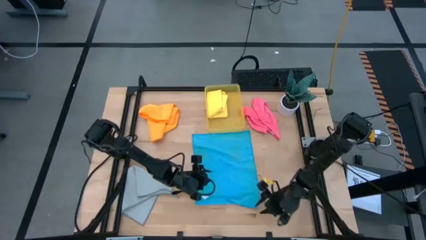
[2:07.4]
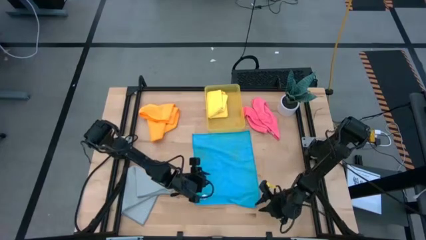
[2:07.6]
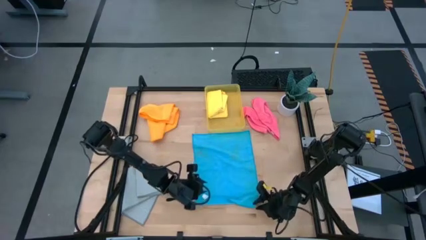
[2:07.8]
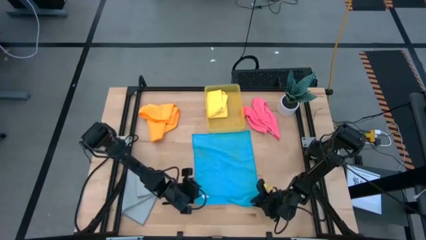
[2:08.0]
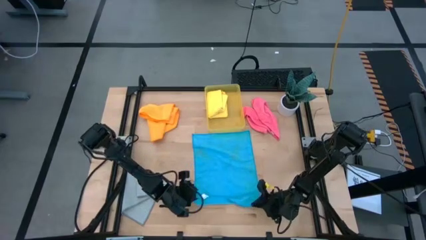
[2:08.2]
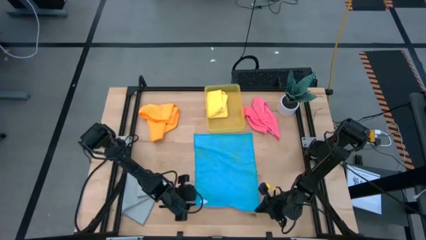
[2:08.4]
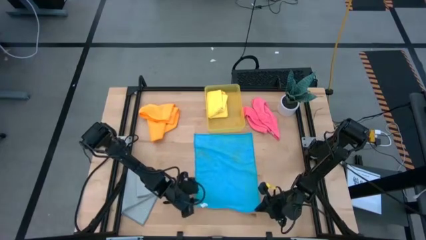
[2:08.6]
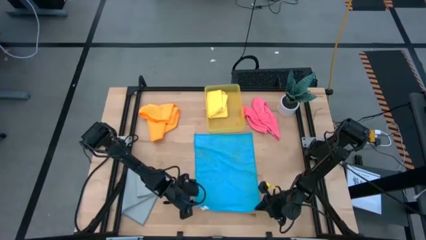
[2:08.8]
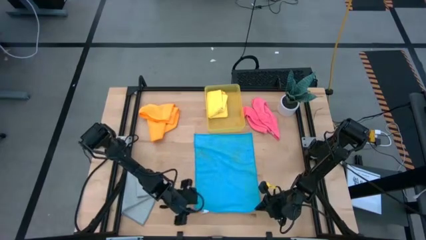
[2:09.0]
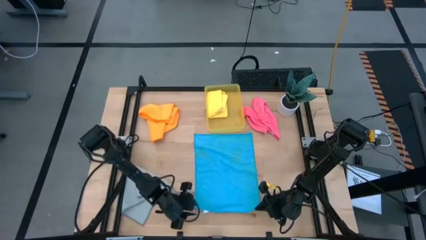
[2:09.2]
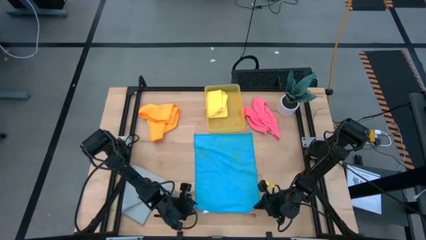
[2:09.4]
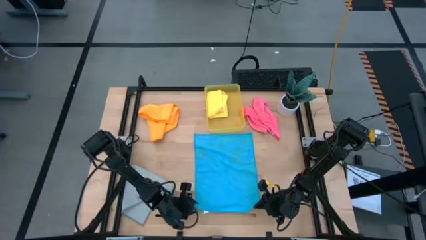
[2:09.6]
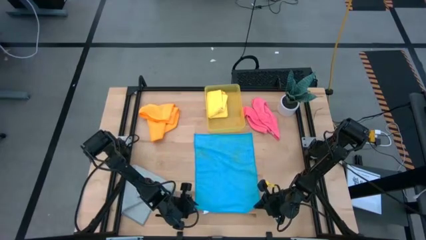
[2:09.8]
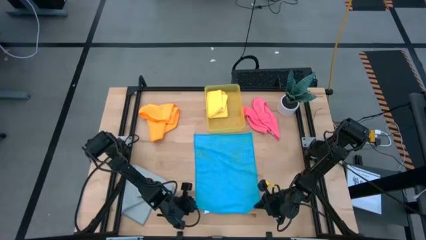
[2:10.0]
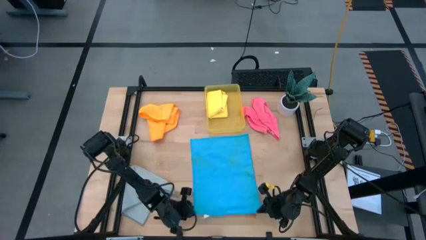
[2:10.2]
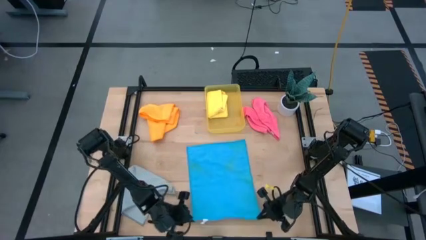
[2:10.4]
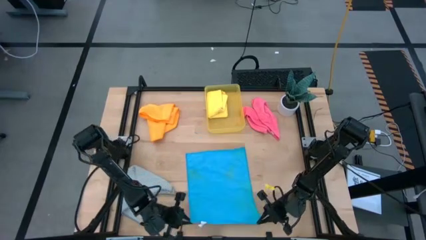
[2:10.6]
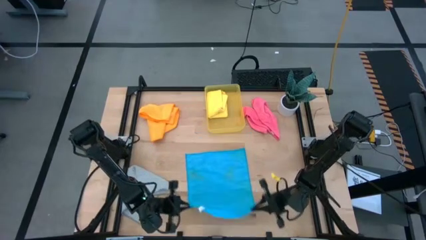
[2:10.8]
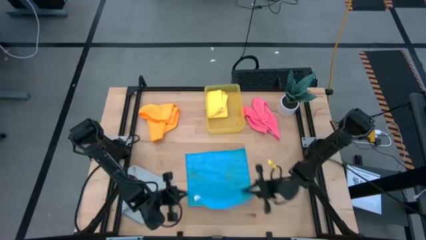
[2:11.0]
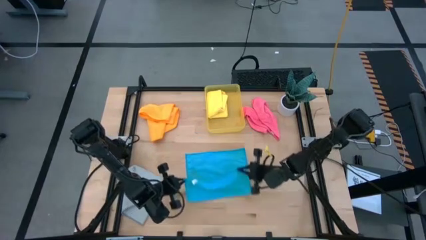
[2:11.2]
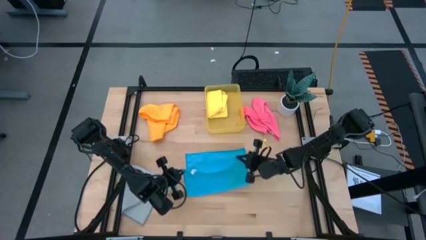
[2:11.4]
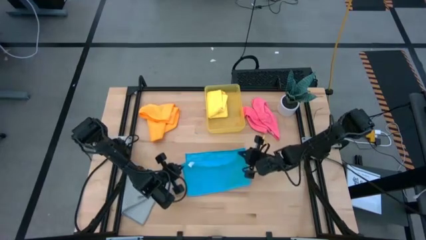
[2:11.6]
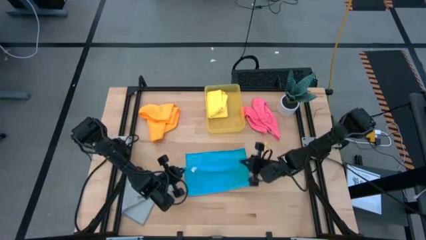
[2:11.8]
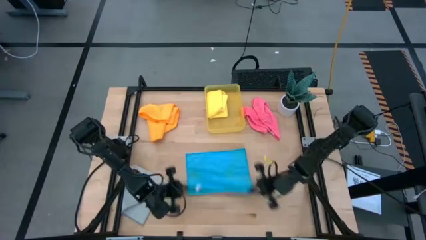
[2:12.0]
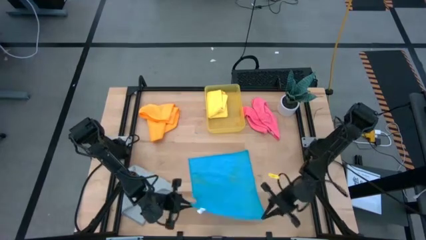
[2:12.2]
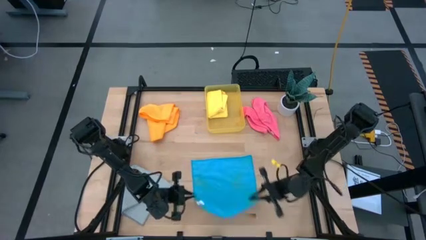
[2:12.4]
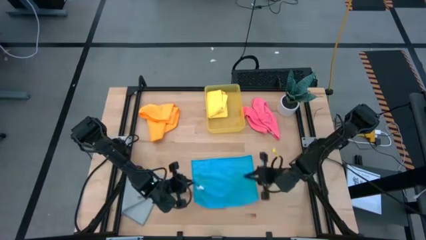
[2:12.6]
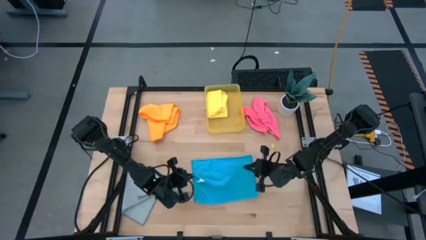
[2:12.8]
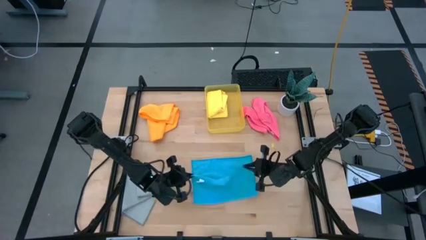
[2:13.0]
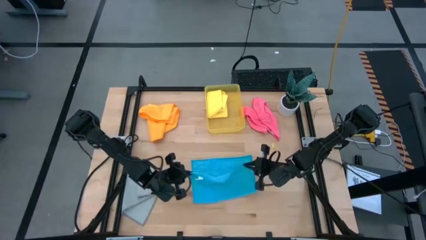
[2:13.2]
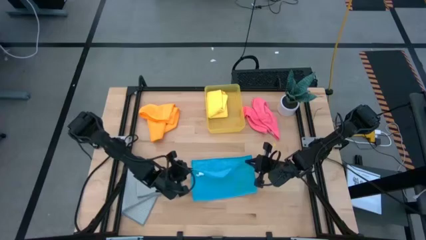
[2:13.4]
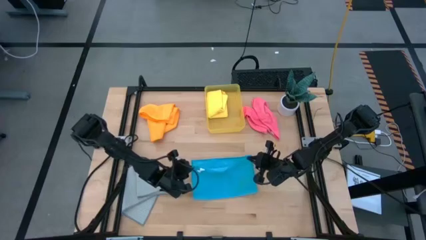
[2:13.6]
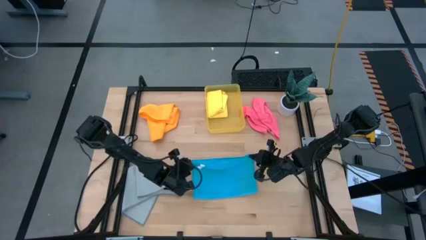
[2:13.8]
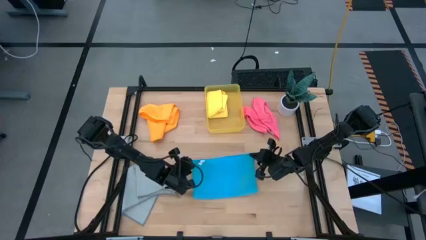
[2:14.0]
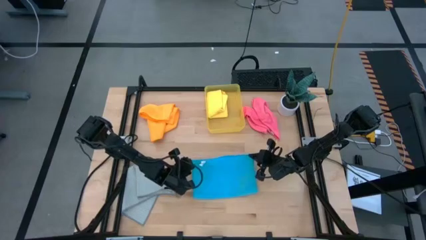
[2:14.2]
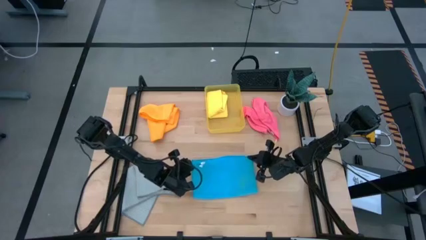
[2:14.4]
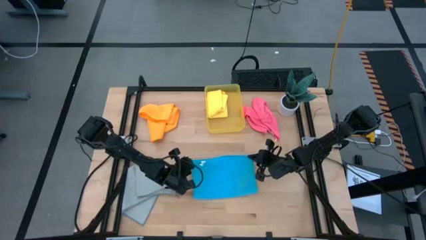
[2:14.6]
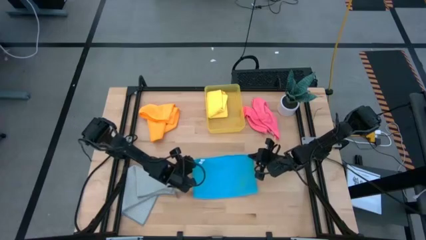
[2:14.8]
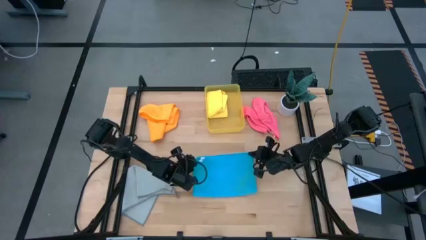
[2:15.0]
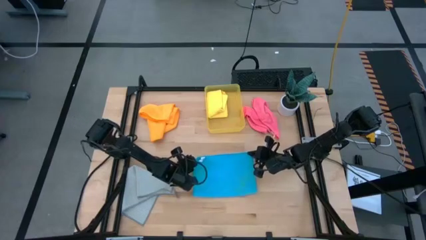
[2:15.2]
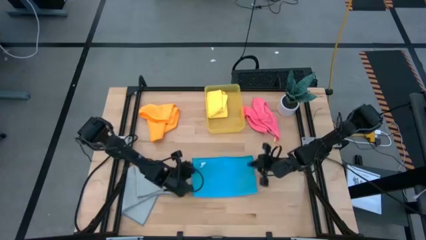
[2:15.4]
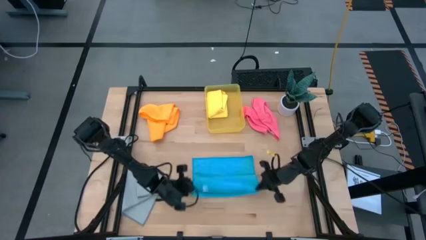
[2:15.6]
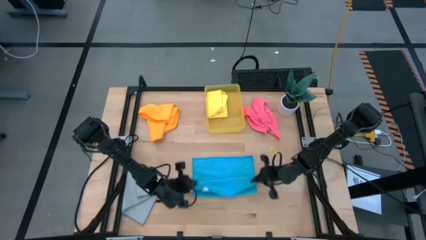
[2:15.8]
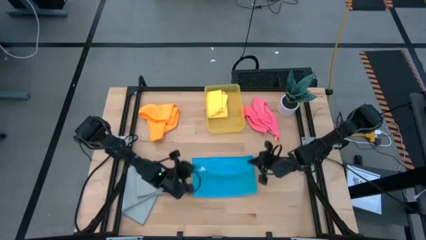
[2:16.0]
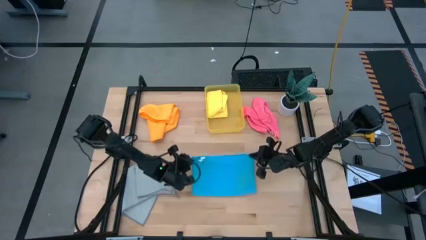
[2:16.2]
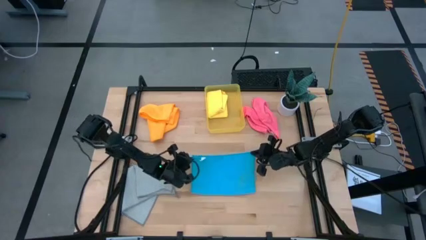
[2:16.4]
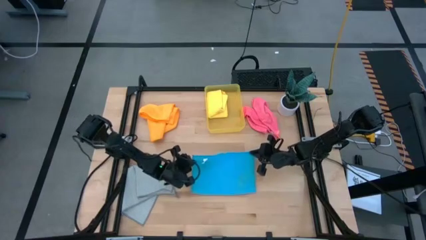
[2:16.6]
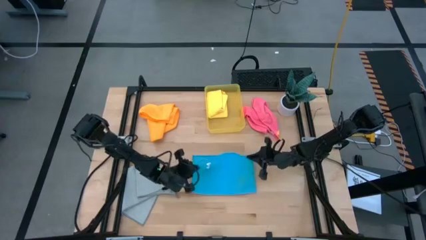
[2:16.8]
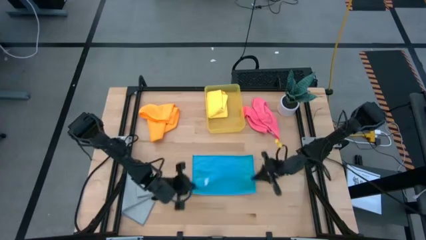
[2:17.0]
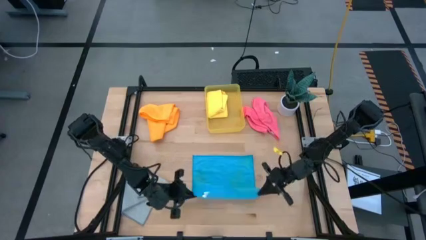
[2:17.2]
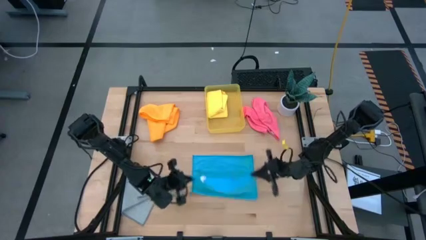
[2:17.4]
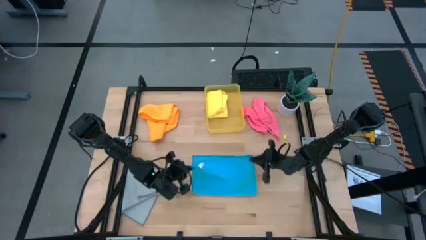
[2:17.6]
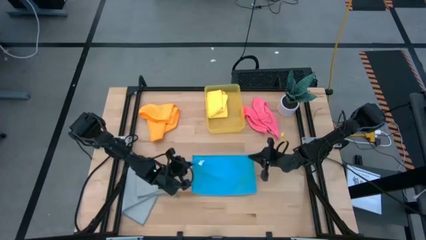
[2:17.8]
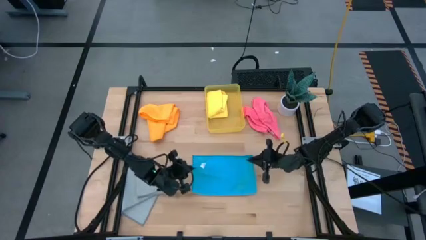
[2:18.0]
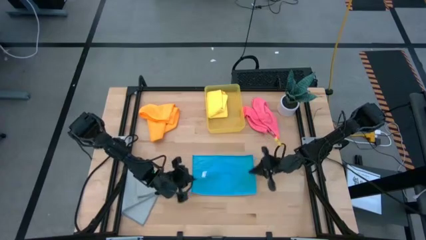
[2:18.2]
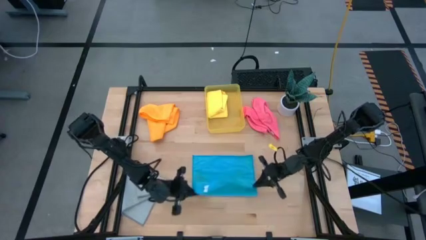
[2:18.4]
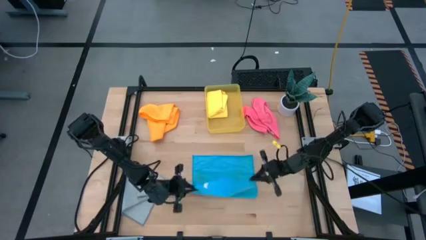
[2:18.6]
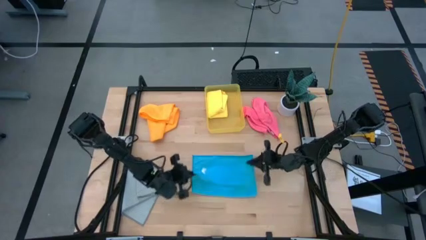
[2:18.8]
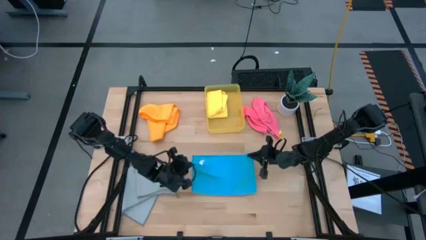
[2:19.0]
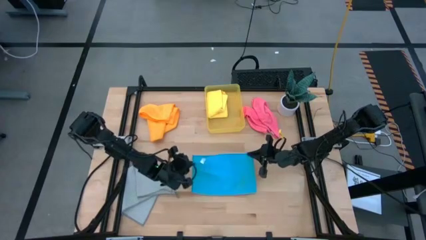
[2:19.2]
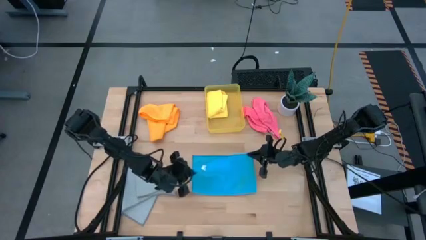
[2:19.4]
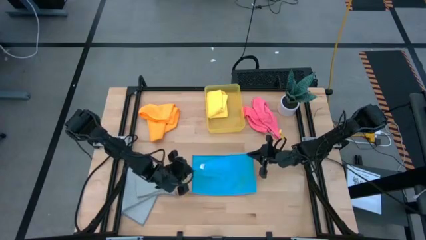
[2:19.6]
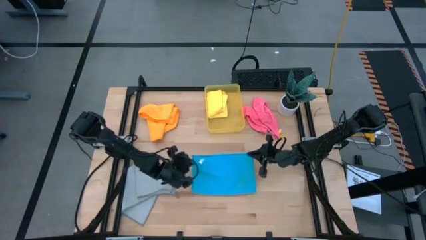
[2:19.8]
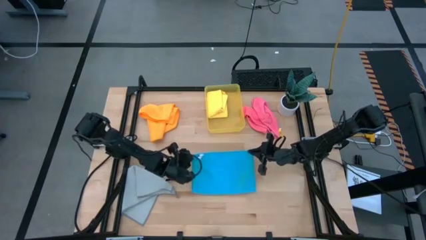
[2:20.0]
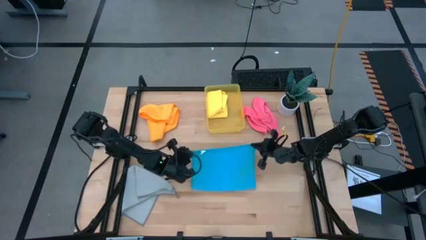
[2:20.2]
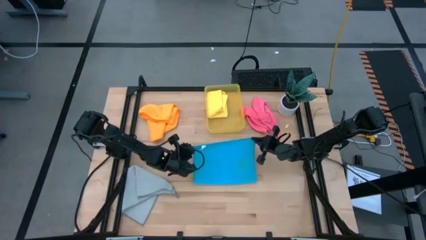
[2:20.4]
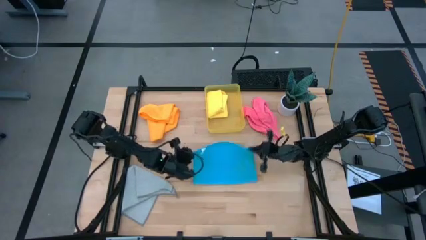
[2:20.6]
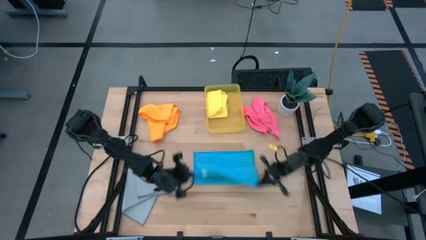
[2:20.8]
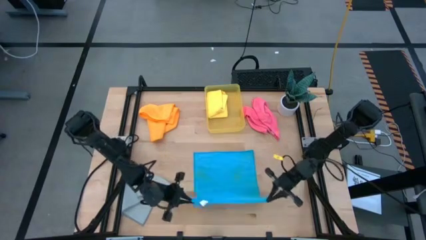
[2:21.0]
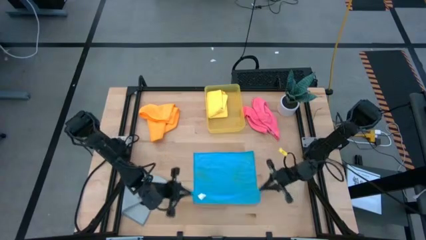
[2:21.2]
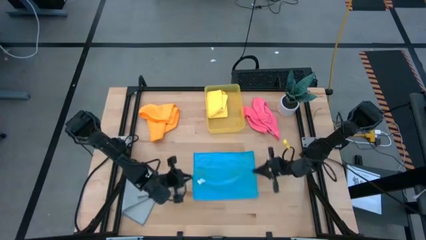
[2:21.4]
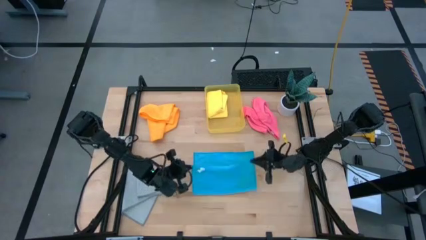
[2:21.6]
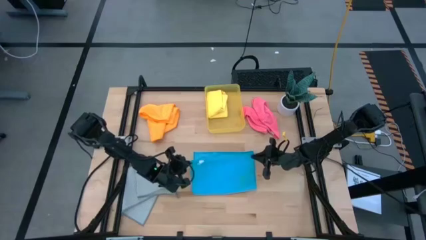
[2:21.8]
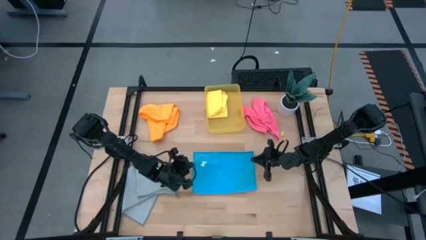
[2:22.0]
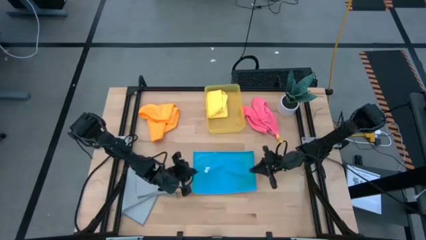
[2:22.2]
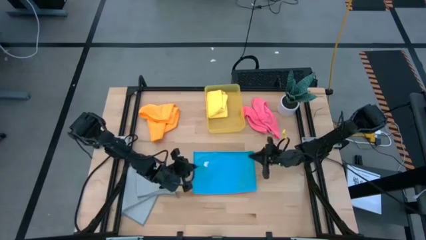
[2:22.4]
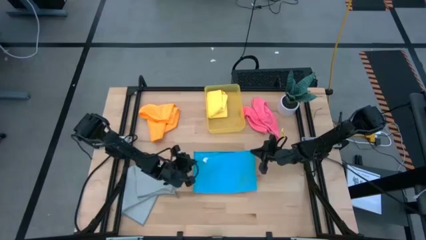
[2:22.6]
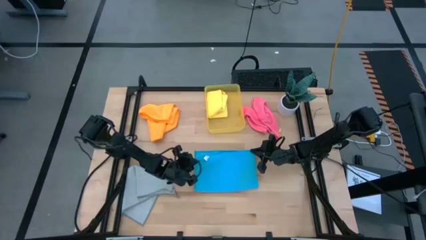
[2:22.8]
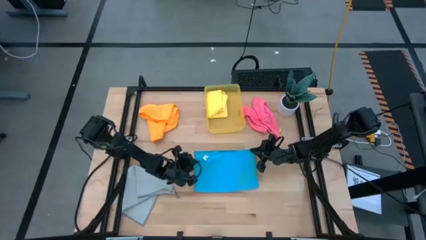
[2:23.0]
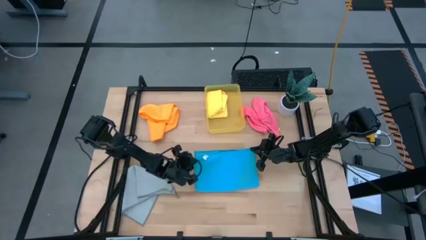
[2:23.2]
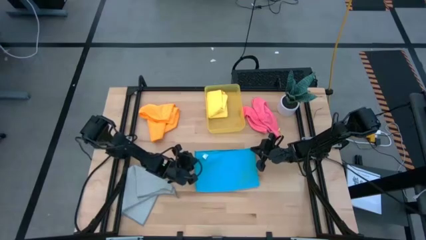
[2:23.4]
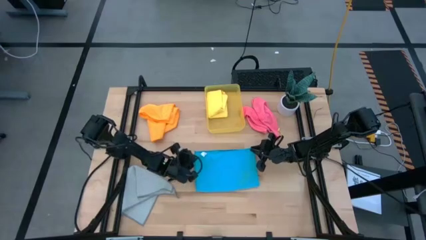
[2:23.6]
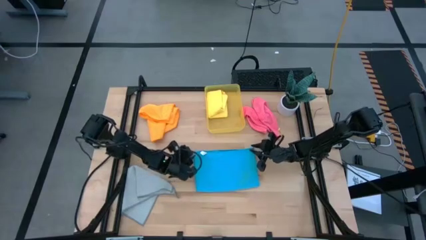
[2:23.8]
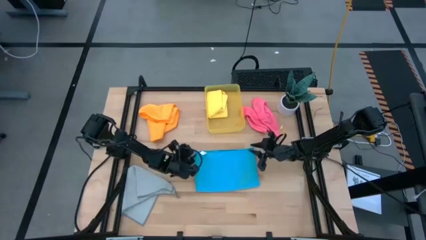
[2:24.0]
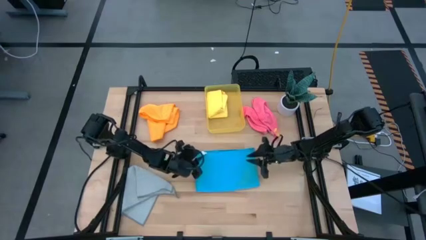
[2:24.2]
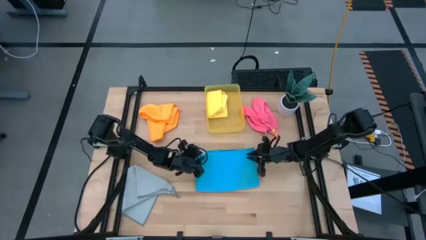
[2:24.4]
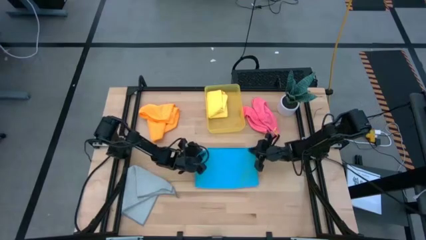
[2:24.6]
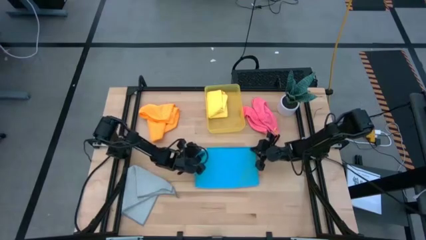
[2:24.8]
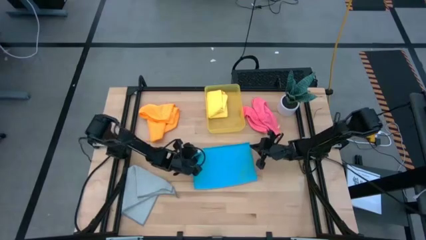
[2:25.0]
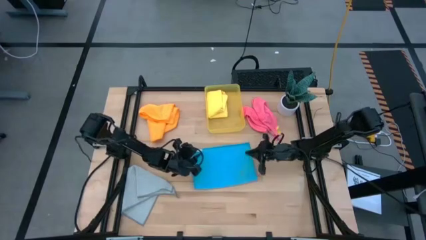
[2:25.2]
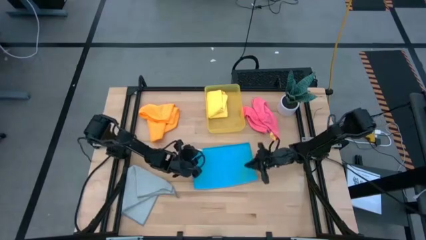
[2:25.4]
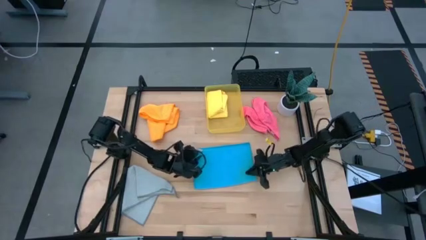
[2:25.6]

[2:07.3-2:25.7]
Task: Fold microfiber towels
Fold the blue microfiber towel
